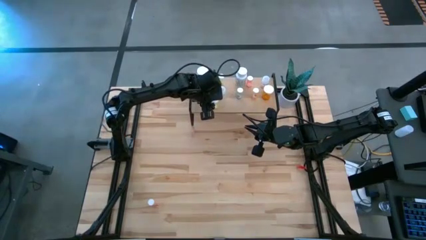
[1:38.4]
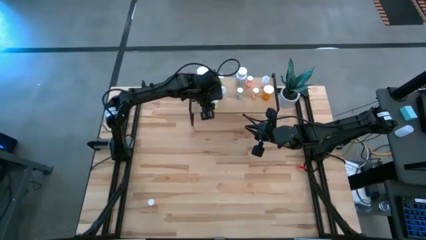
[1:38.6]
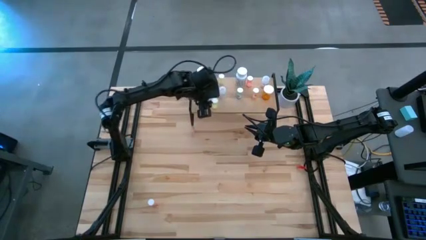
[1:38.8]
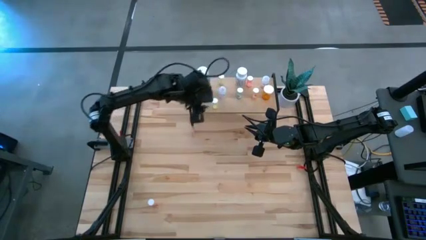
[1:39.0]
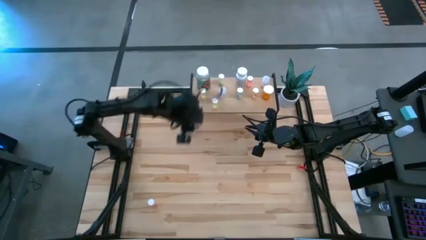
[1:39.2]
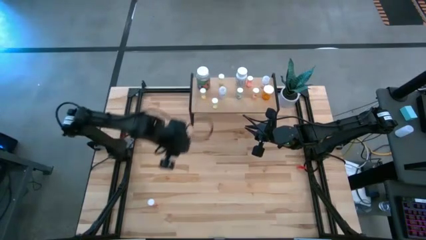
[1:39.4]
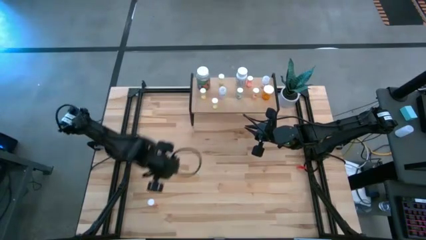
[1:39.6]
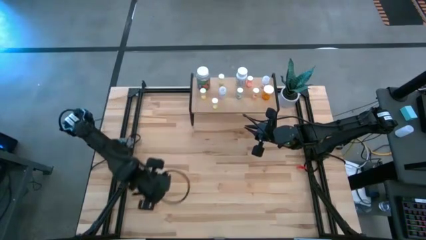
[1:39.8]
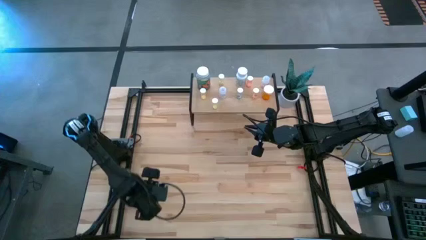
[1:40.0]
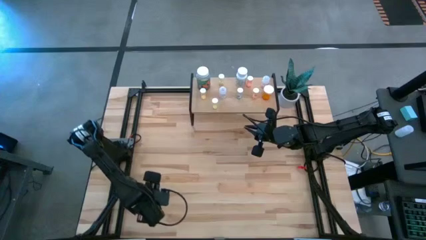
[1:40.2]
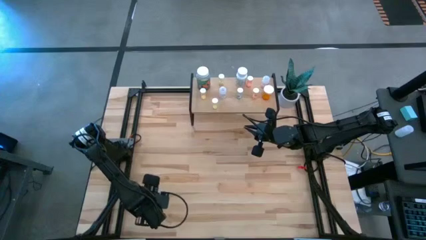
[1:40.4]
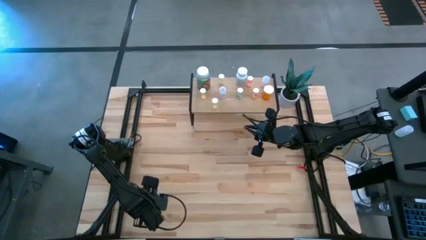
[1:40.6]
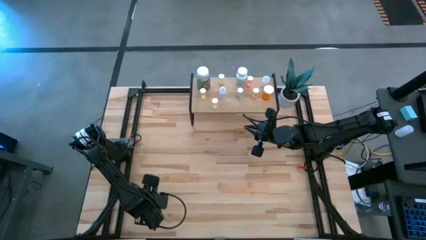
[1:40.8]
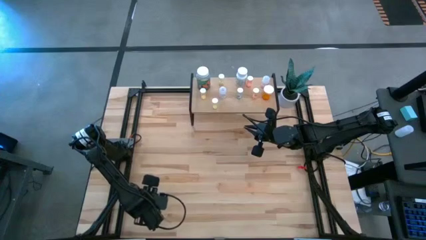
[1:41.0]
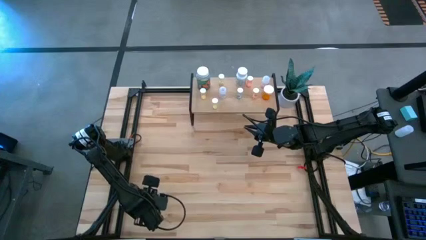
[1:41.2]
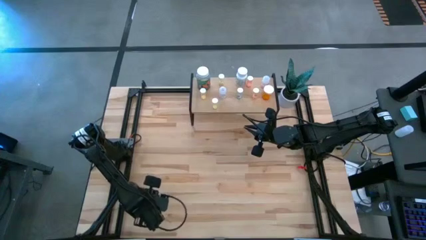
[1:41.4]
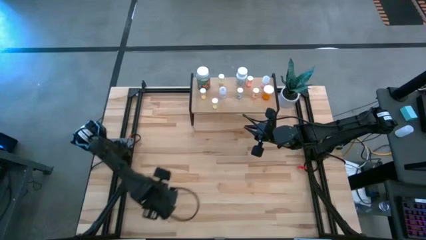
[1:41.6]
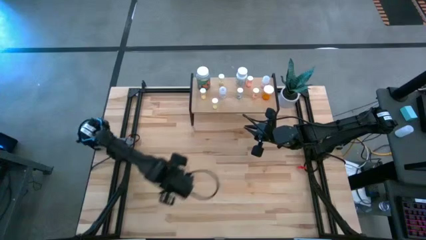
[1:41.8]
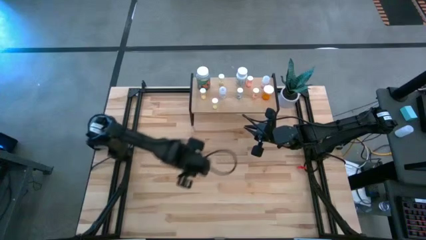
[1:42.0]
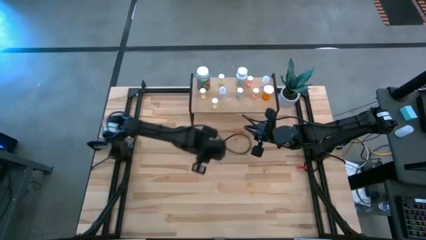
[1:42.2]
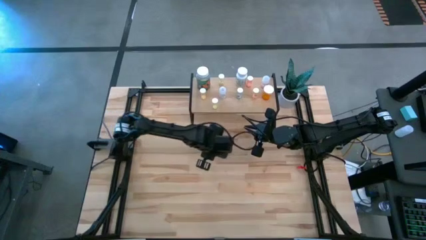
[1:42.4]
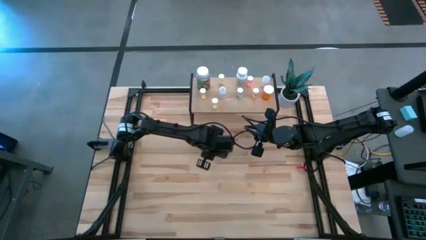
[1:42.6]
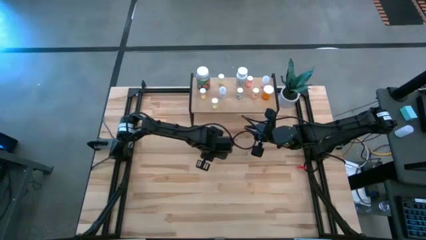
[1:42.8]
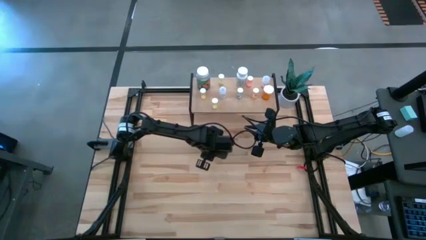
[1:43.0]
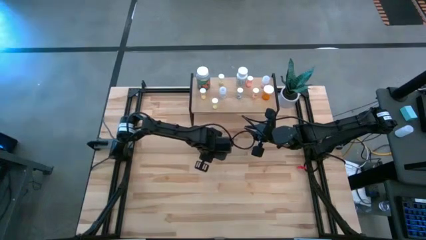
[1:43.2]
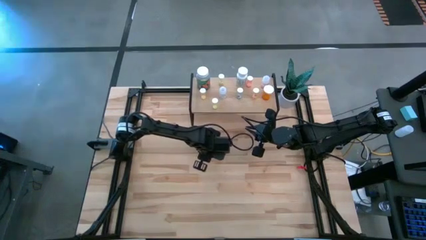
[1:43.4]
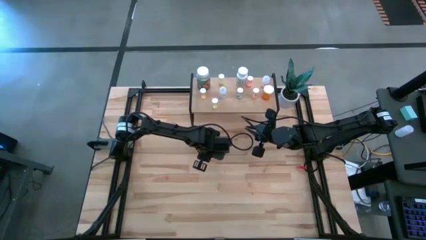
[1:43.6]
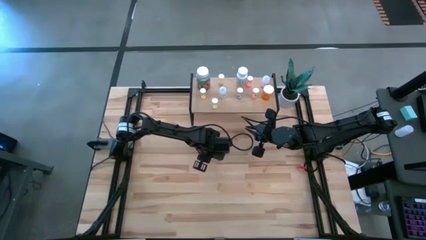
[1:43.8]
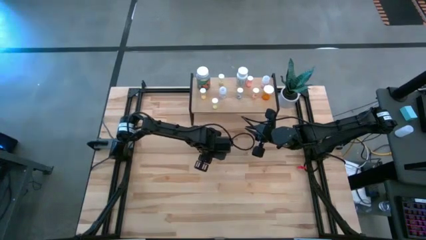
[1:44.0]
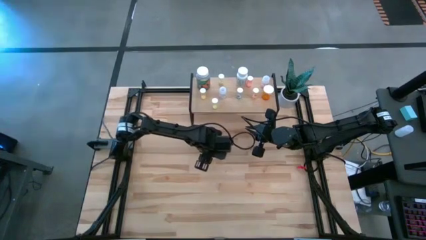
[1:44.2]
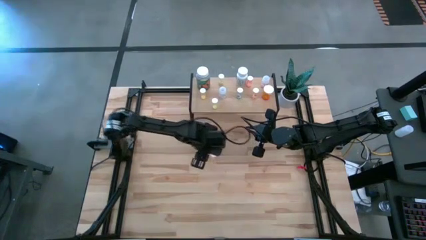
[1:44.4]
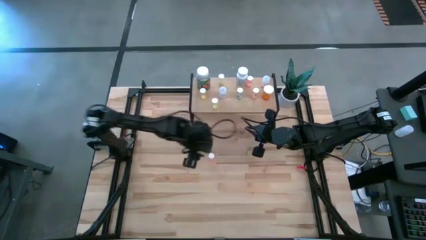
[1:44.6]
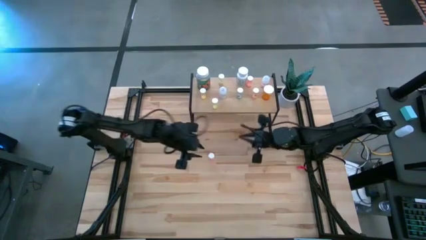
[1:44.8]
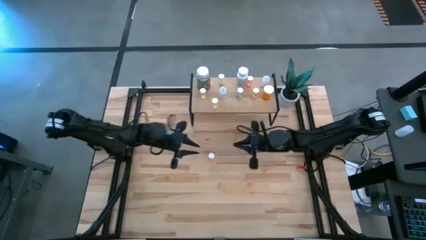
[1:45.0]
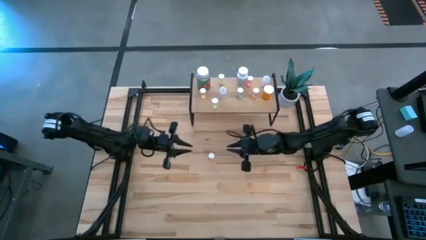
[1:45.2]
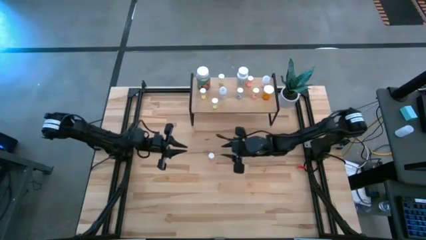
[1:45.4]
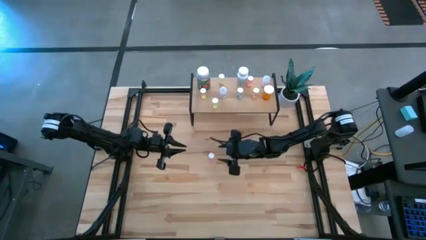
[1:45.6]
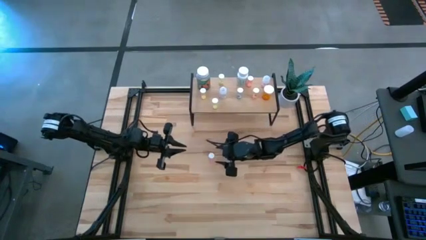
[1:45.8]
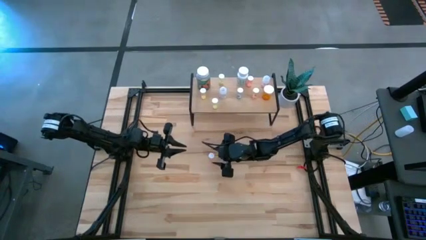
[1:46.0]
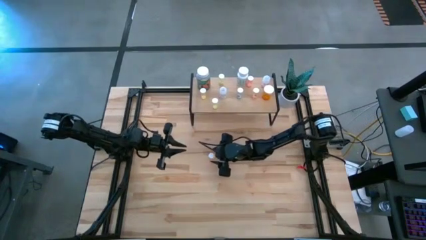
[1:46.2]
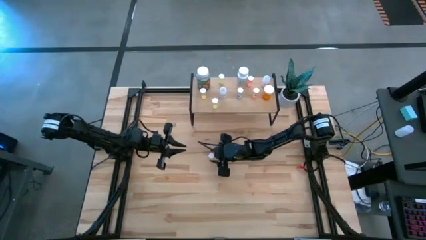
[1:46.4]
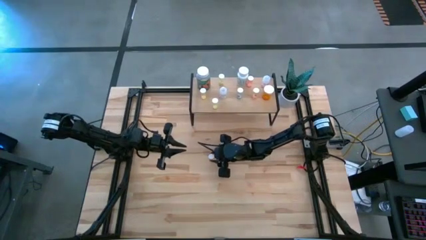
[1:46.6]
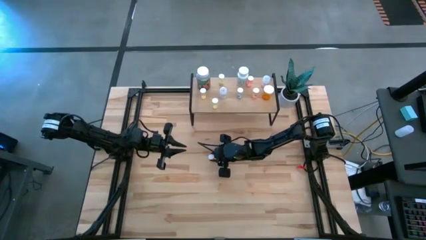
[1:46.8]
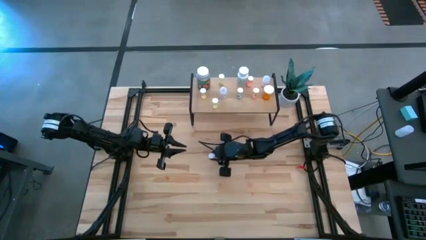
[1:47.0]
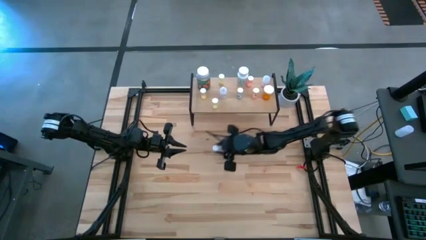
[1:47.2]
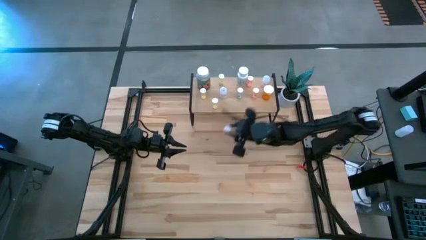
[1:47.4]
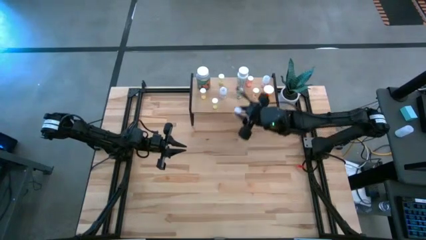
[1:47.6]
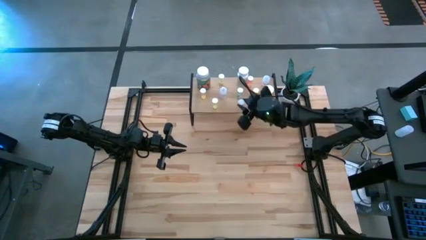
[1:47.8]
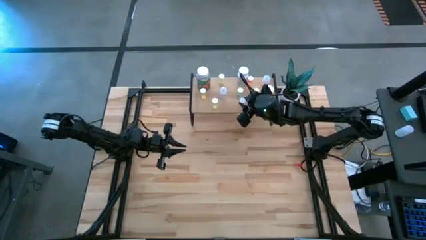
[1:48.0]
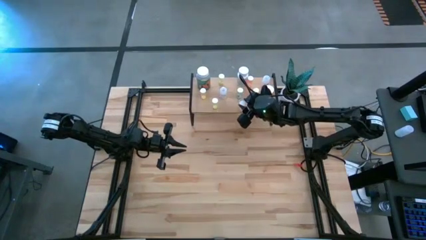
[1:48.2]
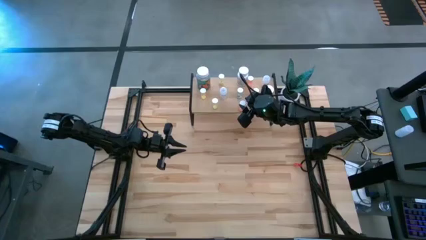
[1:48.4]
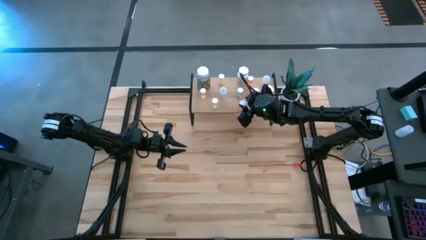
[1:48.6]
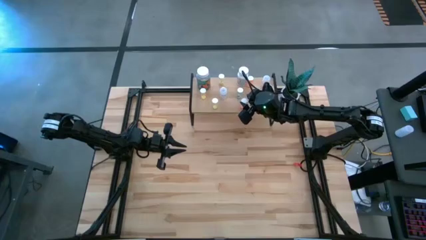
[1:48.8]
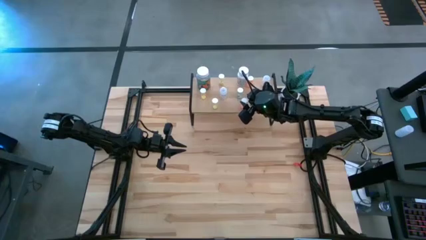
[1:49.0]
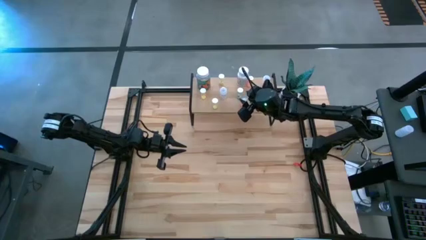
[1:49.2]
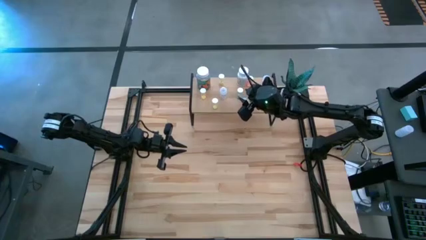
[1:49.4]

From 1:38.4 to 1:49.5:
Task: Pick and place medicine bottles onto shelf by color
Put the pink pill bottle on the shelf

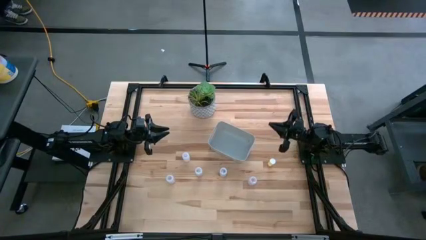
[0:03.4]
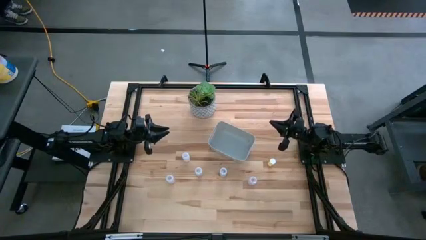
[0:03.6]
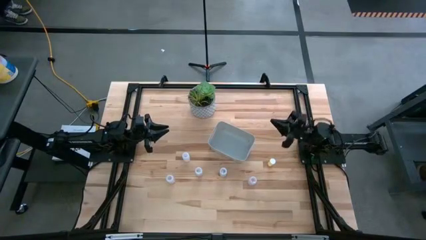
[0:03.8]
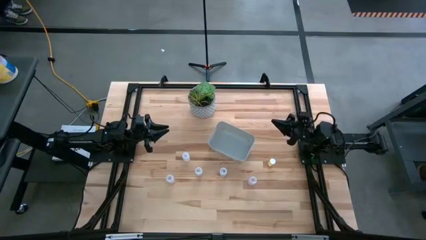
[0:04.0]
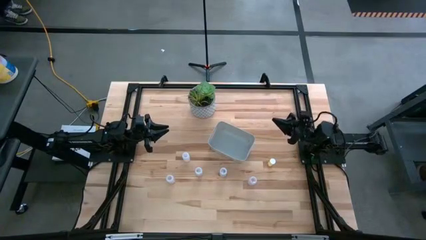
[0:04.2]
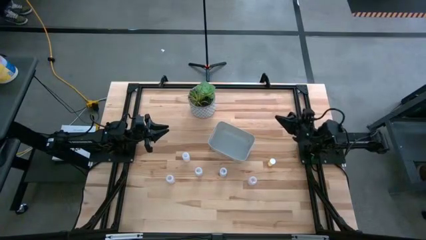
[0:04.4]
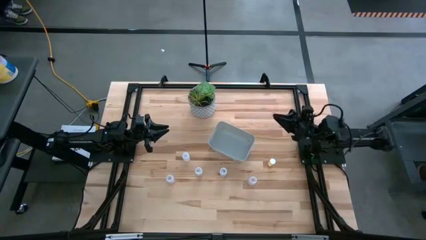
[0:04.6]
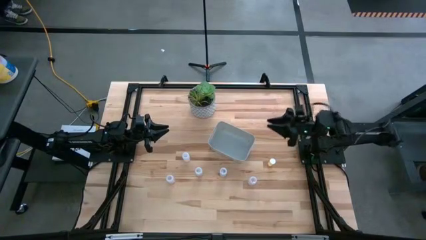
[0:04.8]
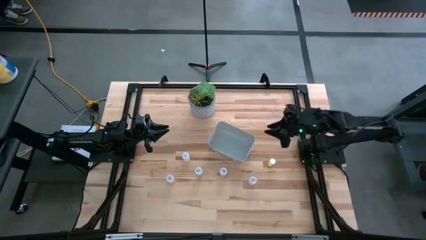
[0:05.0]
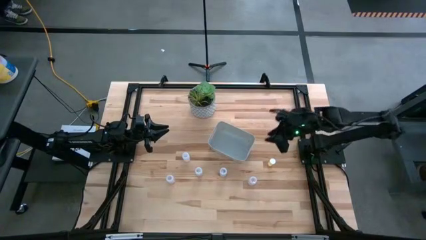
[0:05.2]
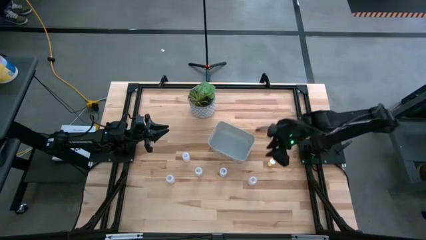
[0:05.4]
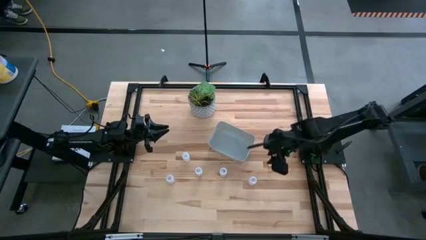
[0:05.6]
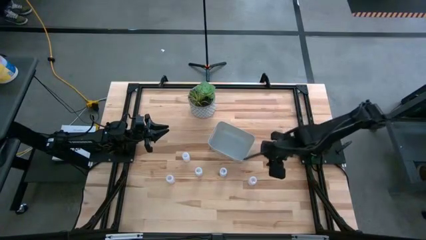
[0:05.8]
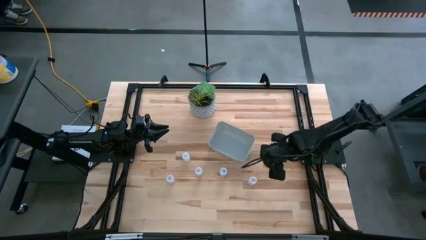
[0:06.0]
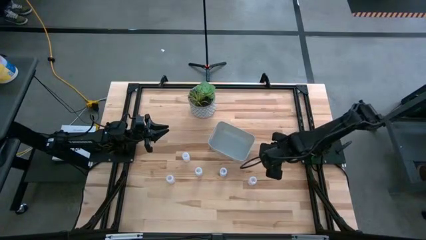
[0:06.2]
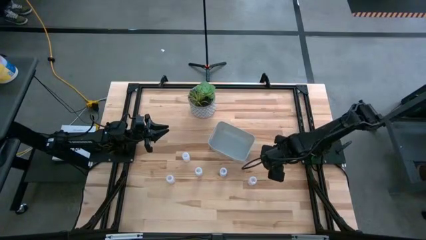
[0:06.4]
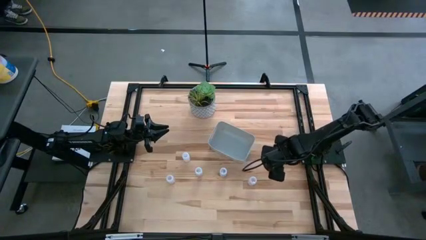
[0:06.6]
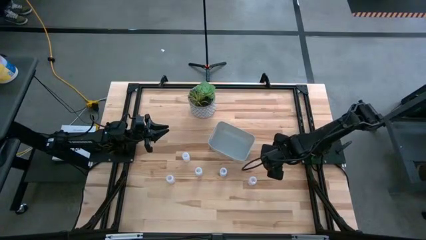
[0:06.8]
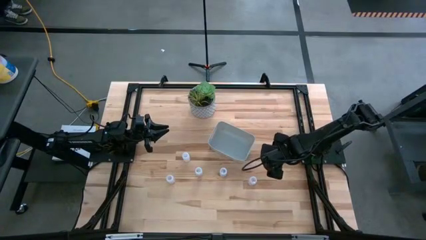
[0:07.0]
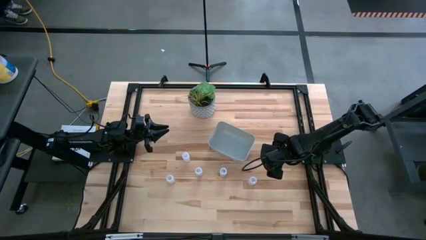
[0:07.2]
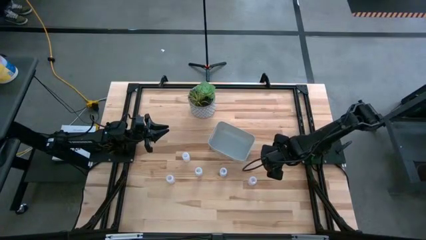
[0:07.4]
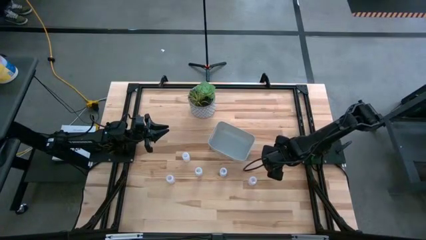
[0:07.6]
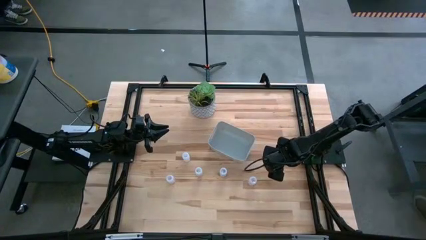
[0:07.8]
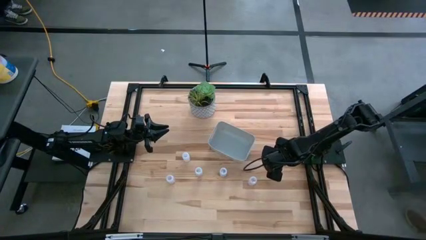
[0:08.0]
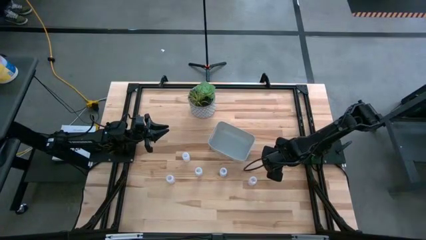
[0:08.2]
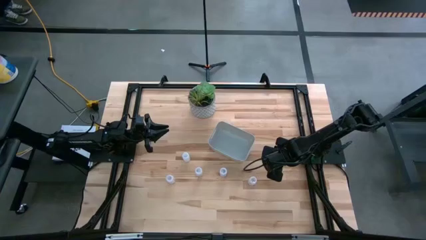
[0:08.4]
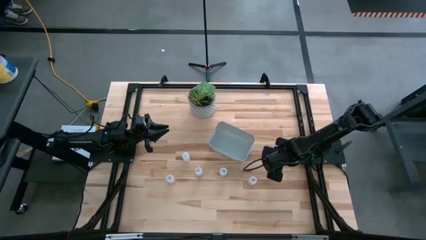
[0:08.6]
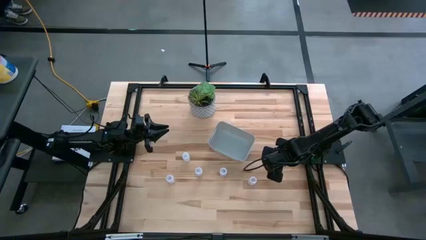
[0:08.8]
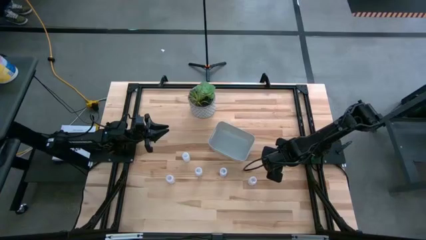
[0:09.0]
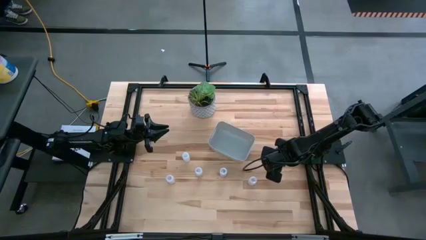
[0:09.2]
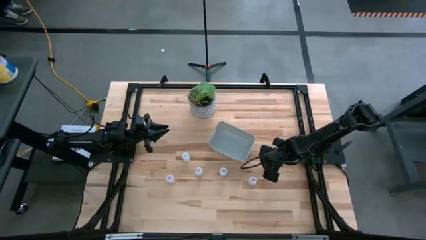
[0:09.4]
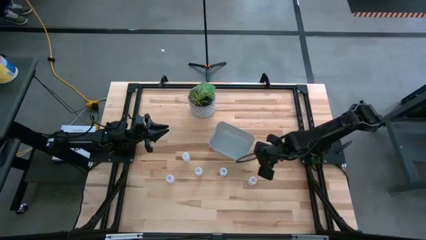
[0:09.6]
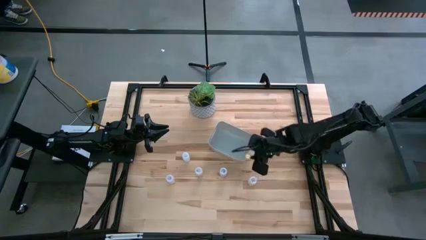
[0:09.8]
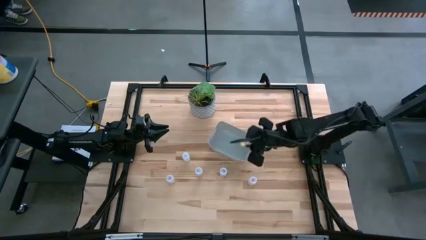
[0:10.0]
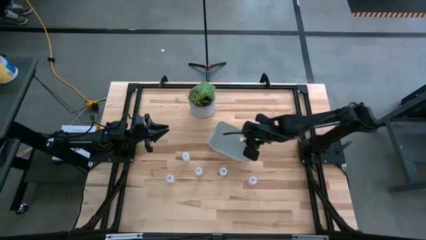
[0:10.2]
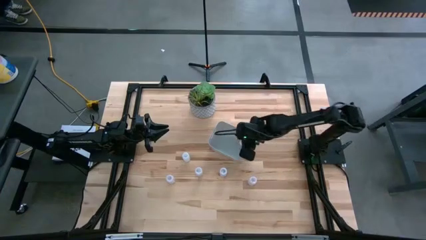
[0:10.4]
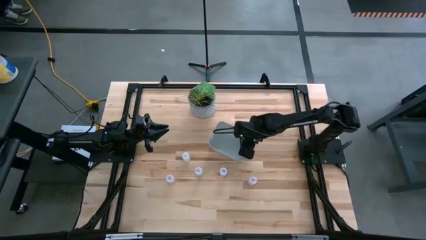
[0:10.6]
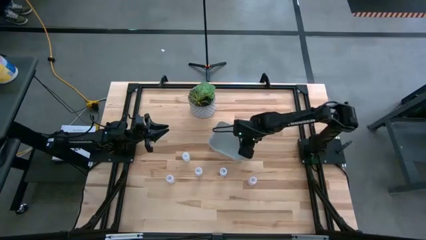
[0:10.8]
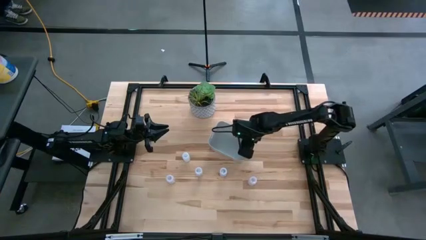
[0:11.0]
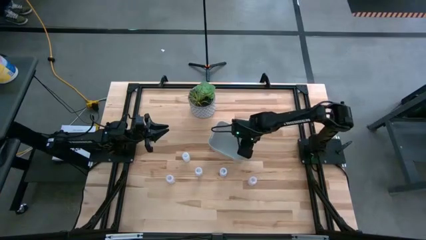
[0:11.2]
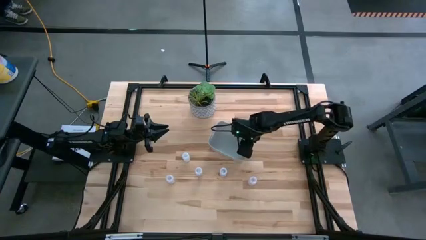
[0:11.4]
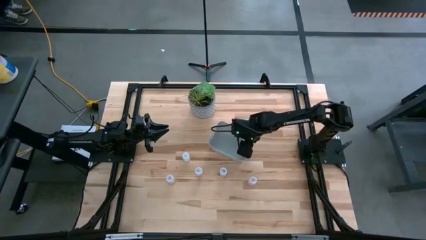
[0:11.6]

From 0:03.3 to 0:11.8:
Task: Pick and place pill bottles into a basket
Put the yellow pill bottle into the white bin
